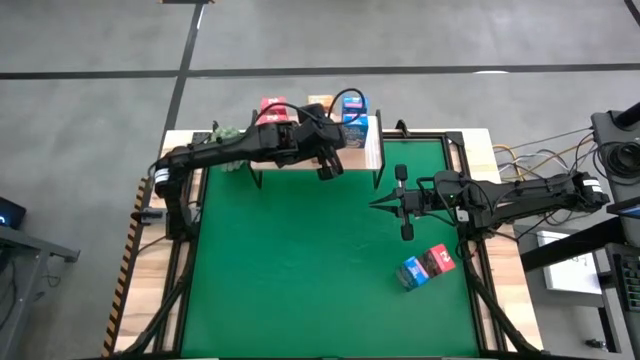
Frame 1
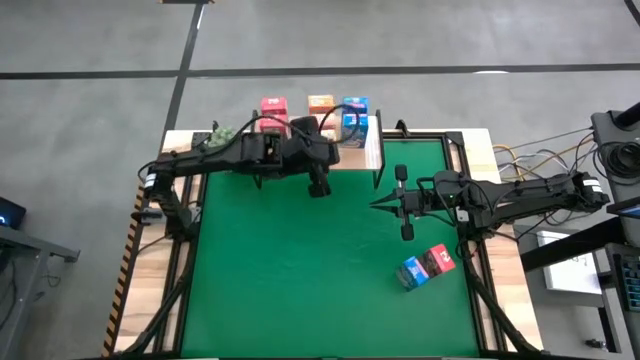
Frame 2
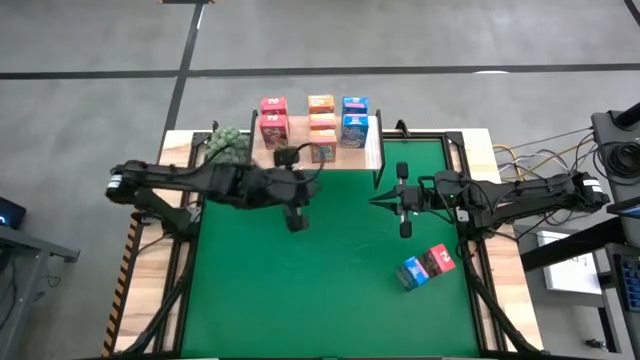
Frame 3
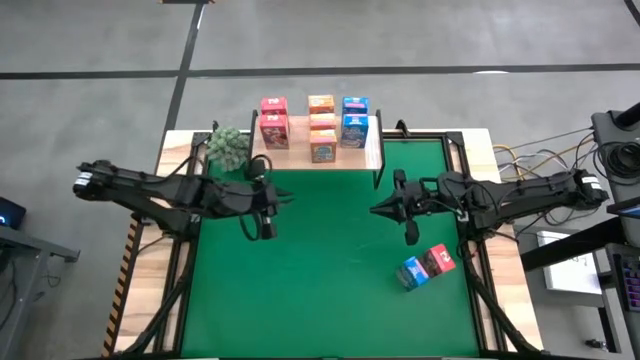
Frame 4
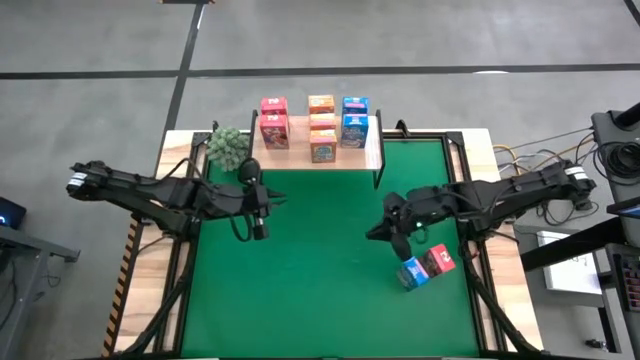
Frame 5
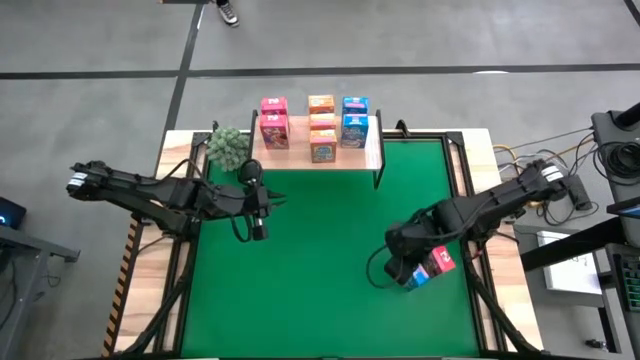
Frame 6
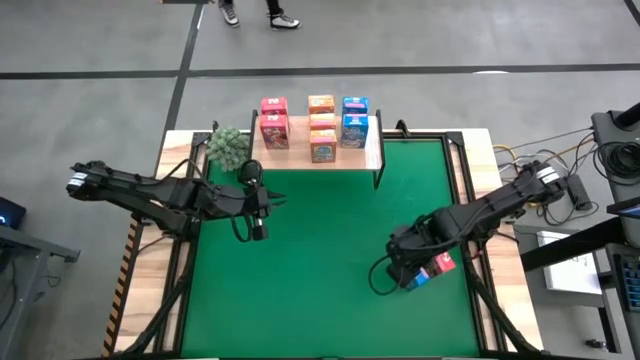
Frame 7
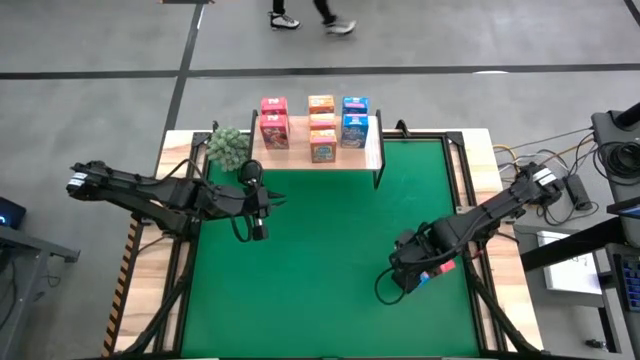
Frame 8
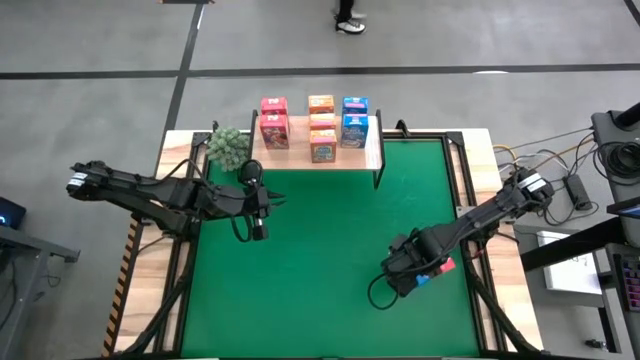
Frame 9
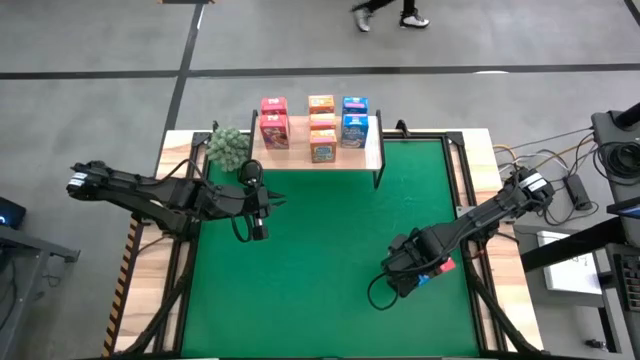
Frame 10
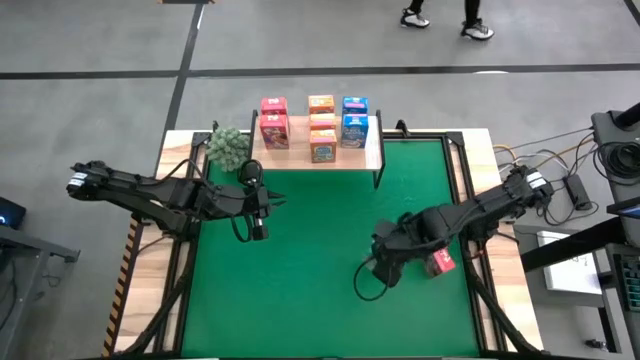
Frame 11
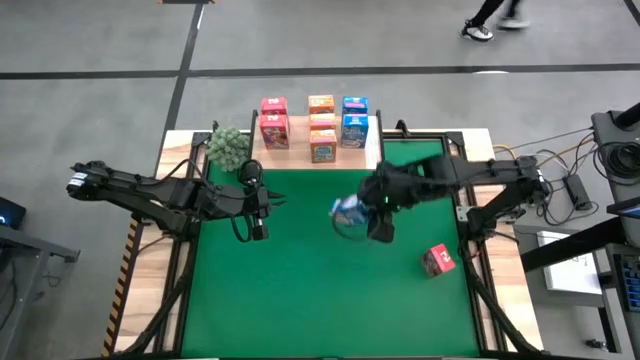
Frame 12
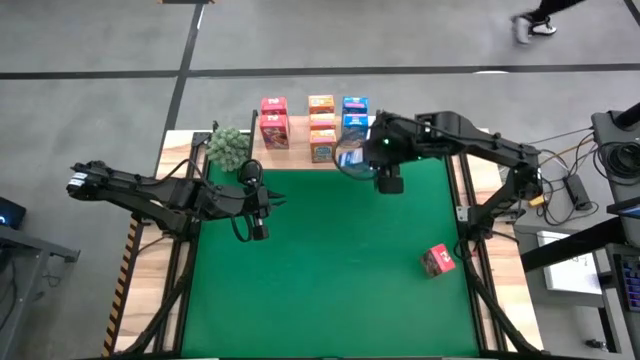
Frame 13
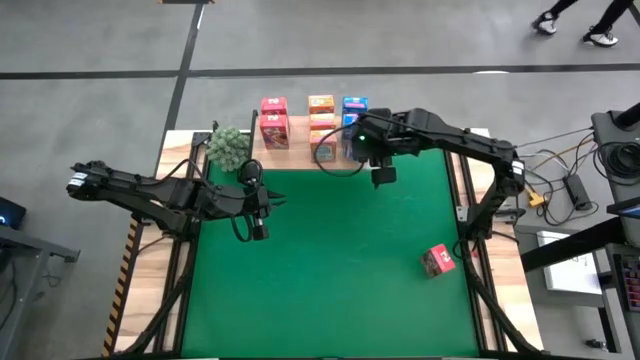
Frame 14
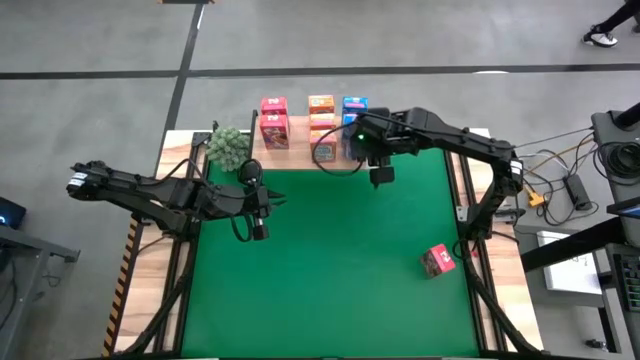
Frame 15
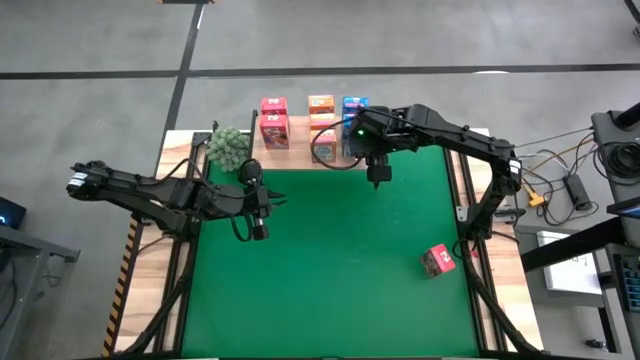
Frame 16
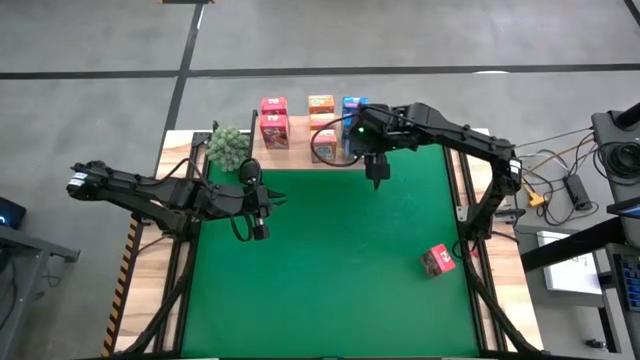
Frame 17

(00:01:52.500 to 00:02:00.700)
Task: Stack cereal on shelf
Put the blue cereal box on the shelf aligned with the other blue cereal boxes

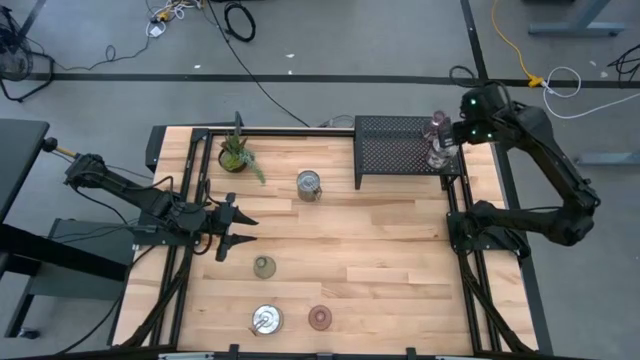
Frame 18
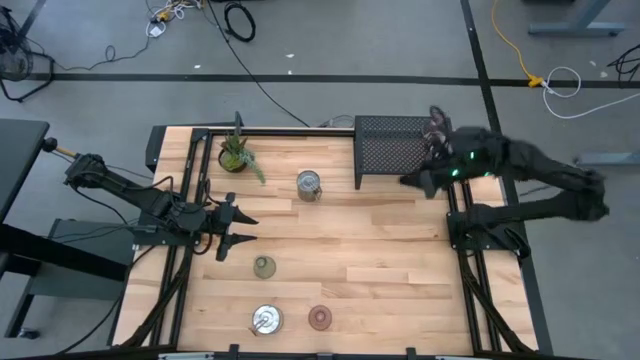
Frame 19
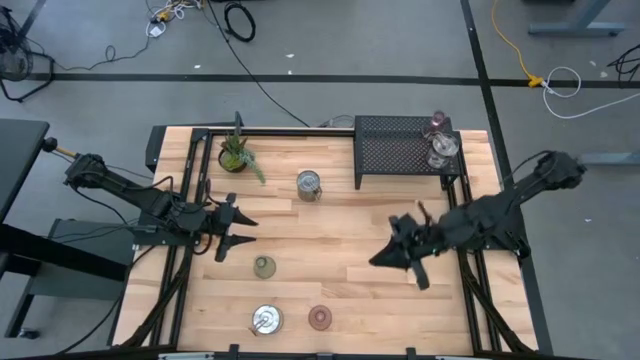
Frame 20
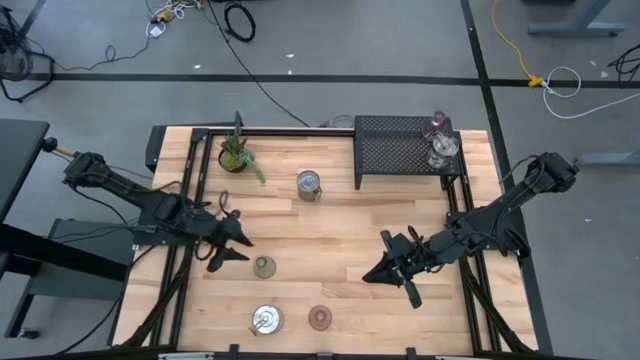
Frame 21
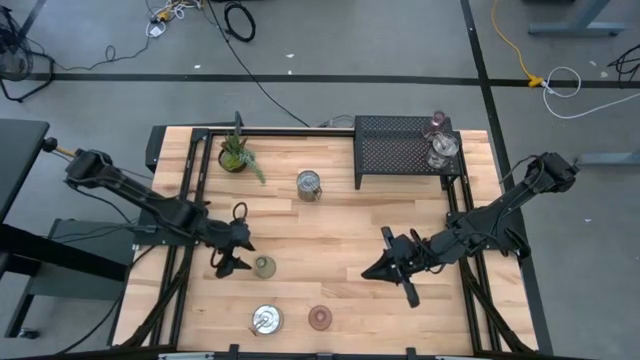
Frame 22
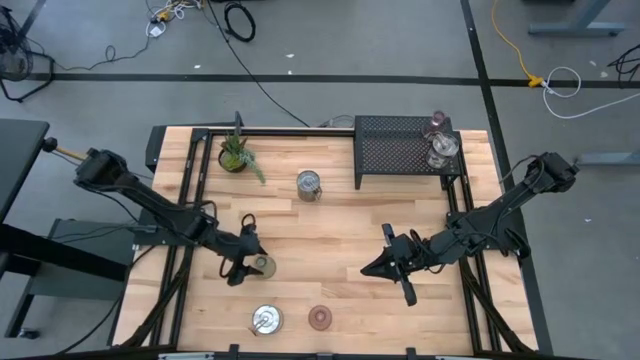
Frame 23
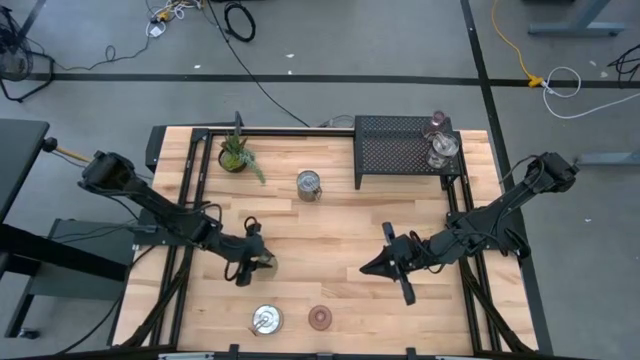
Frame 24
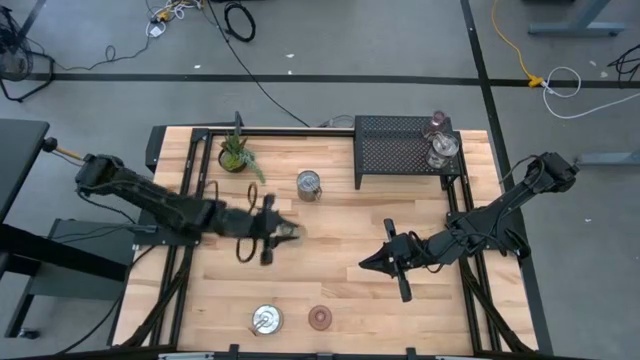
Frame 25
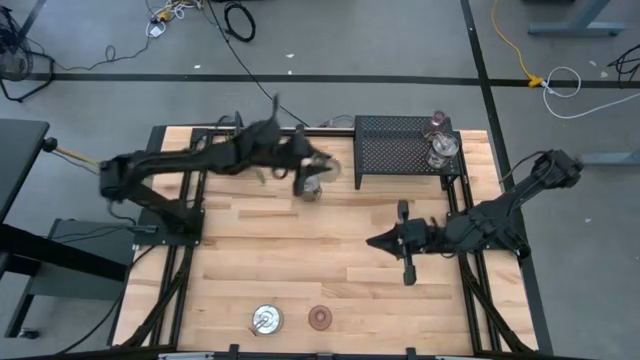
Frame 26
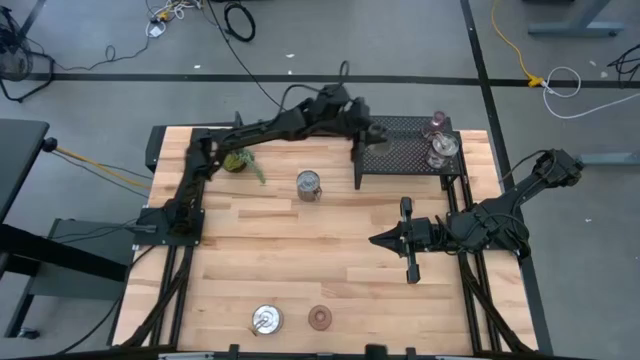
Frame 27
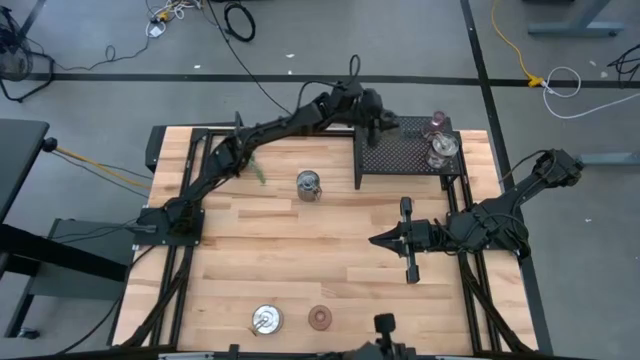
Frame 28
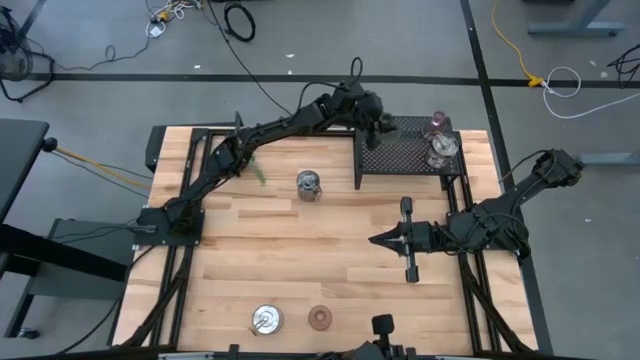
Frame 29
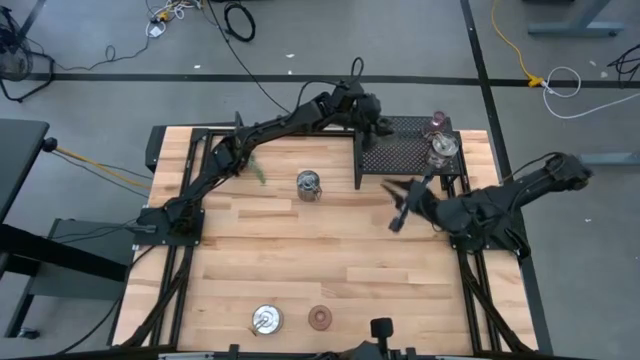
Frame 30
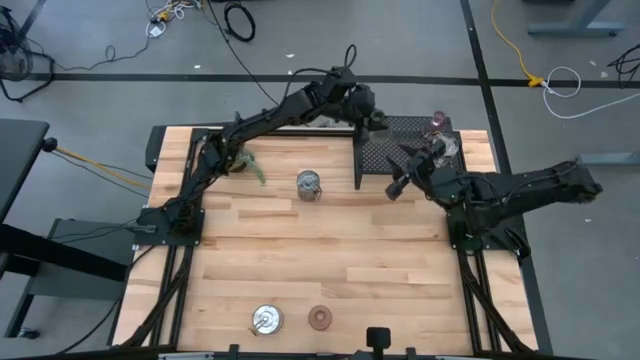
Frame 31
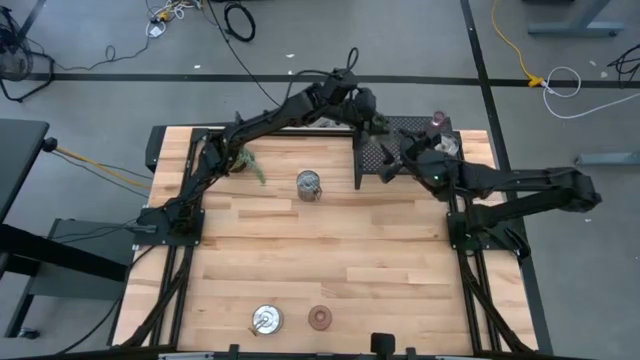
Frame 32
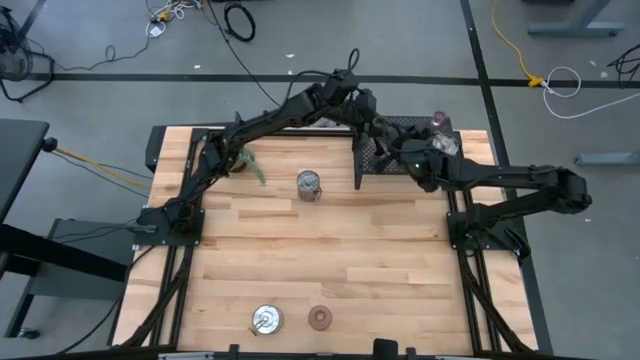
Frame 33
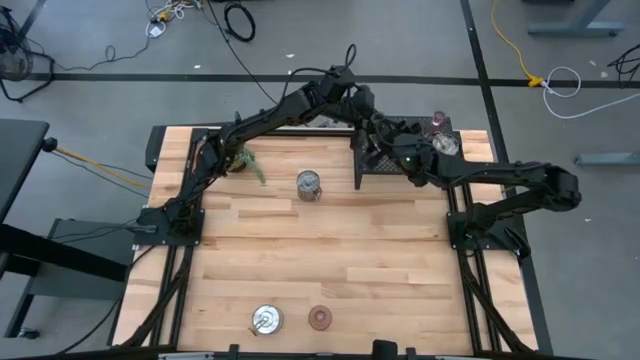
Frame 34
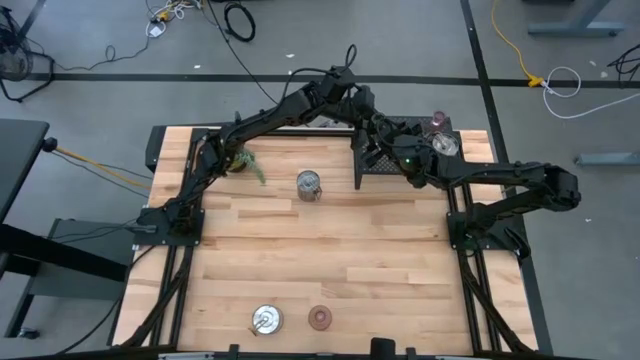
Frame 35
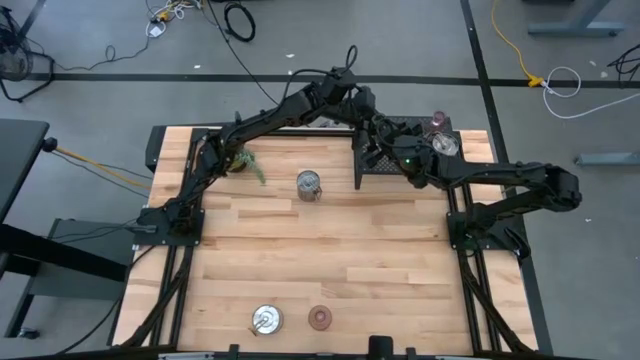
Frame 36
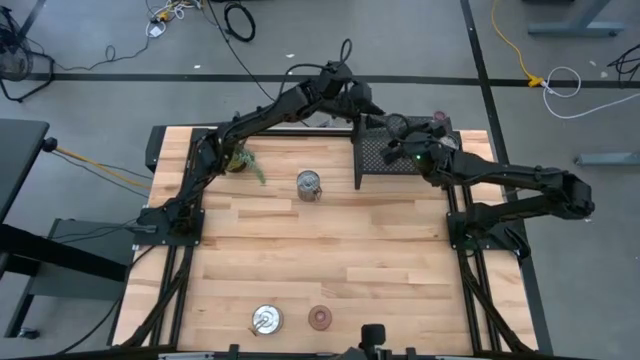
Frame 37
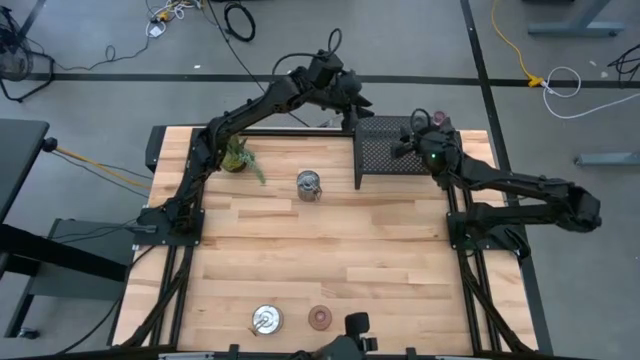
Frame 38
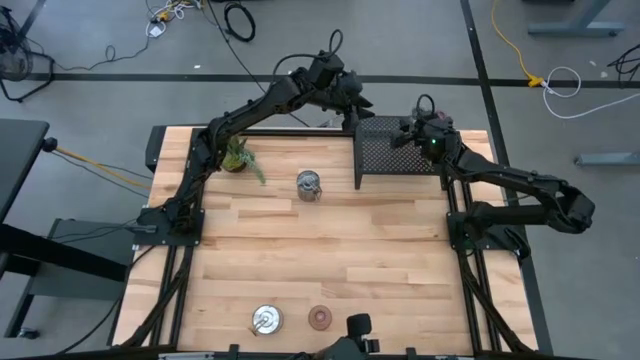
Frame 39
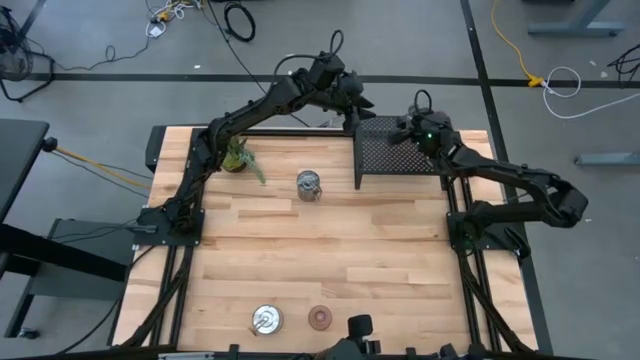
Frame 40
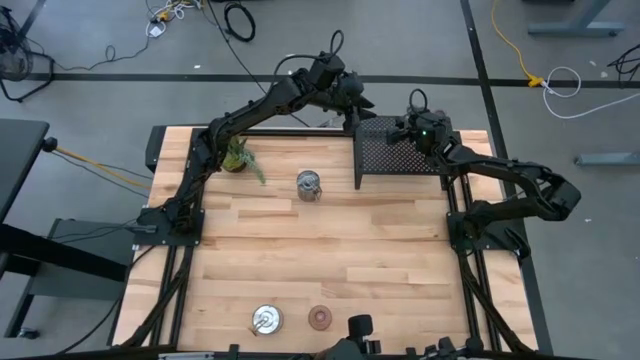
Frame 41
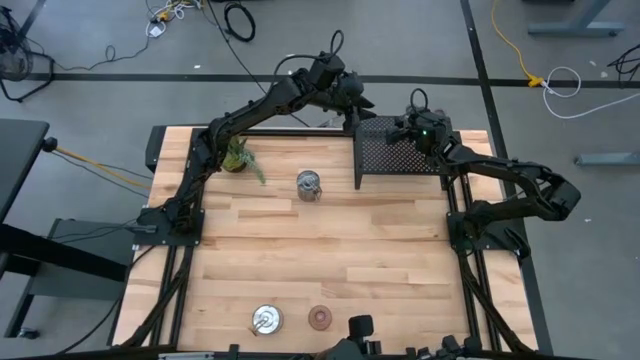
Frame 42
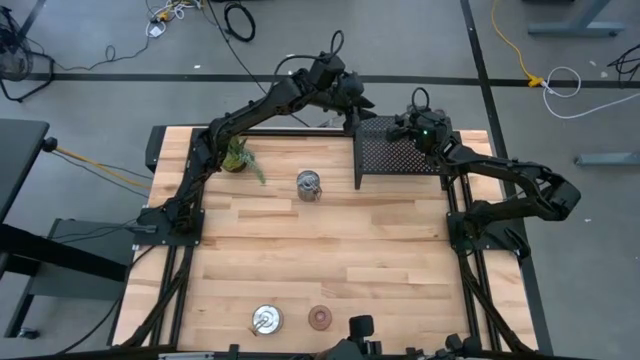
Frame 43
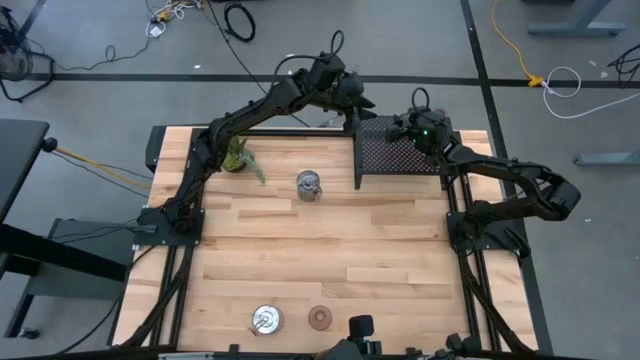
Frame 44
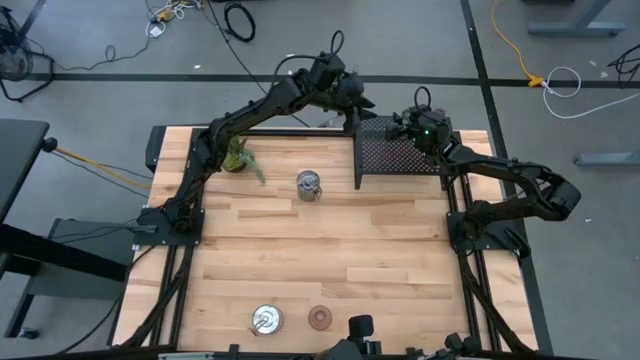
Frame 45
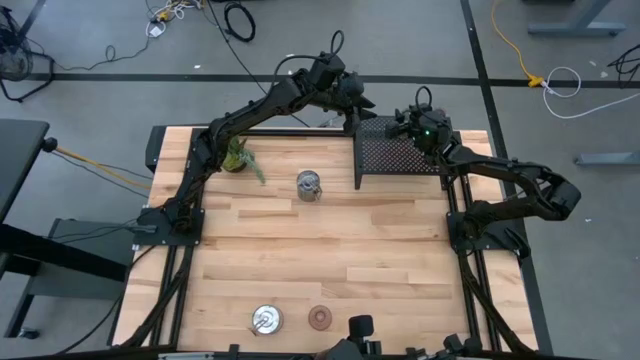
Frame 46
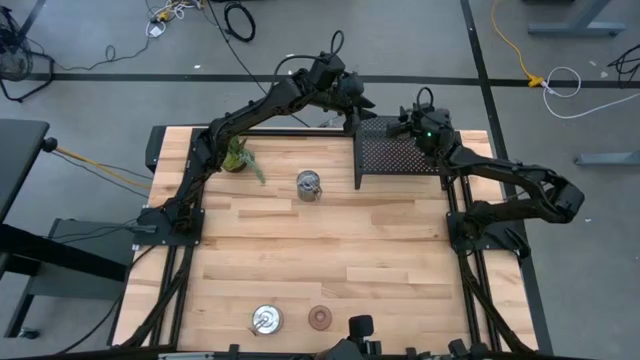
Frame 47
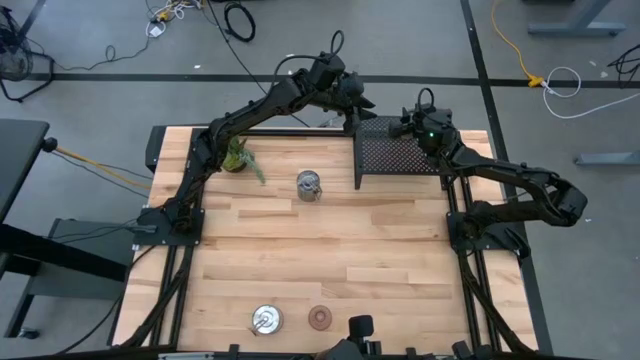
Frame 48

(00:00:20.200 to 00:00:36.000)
Task: Pick & Place candle stick holders
Put the green glass candle holder on the shelf
